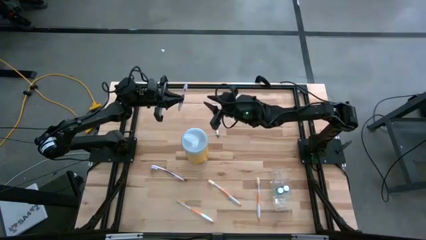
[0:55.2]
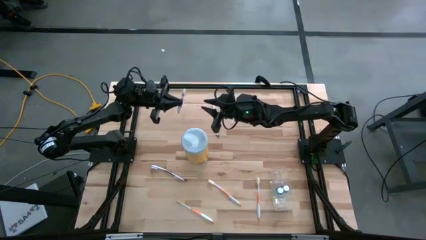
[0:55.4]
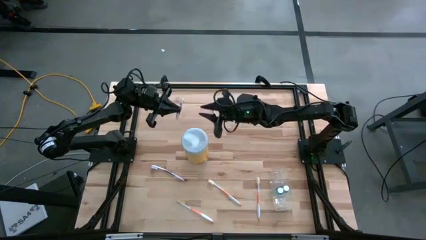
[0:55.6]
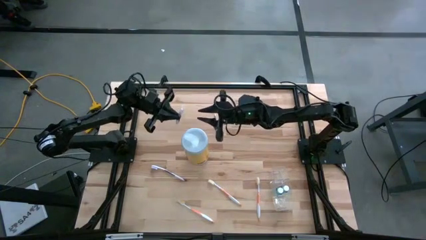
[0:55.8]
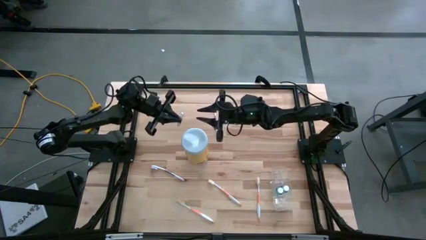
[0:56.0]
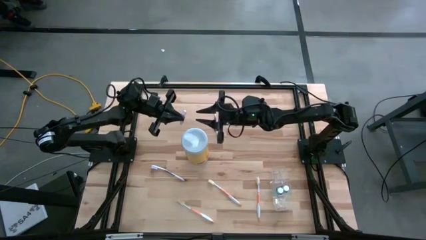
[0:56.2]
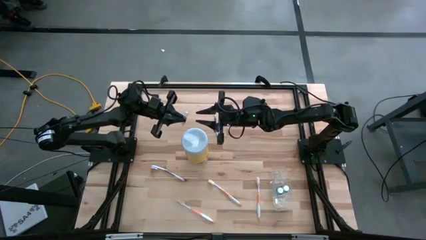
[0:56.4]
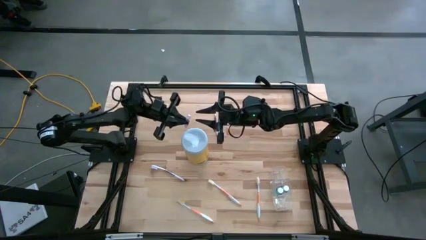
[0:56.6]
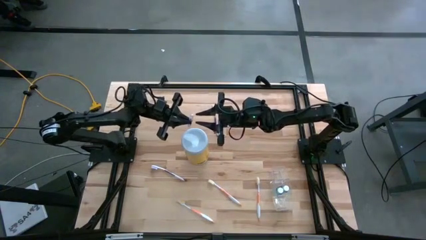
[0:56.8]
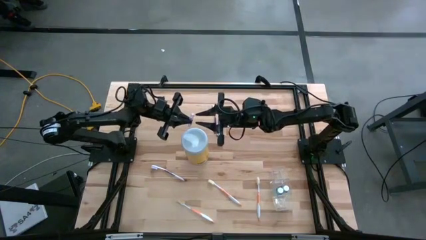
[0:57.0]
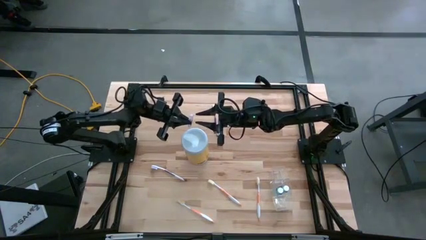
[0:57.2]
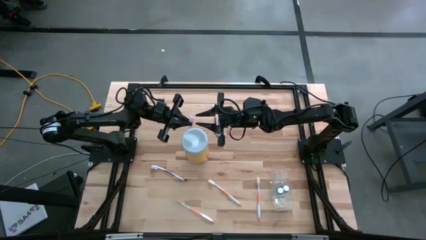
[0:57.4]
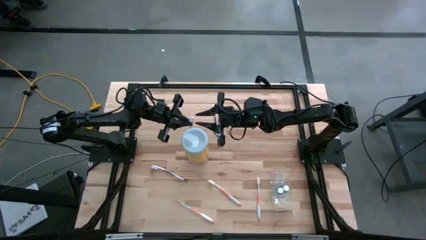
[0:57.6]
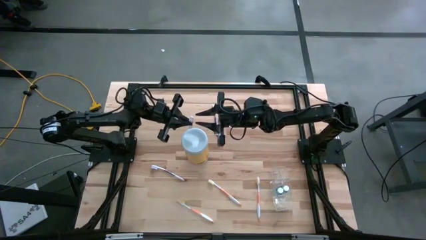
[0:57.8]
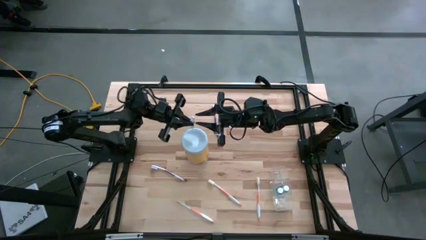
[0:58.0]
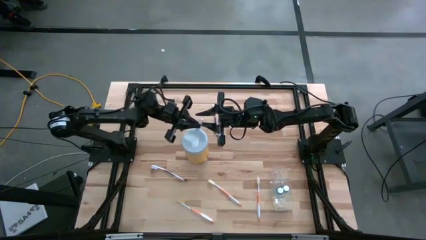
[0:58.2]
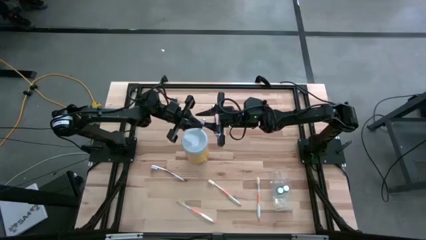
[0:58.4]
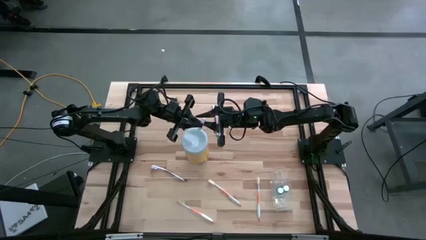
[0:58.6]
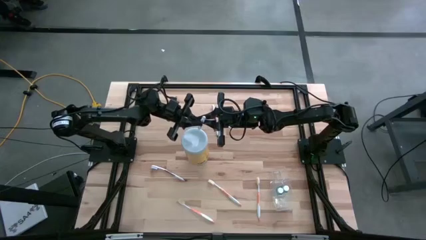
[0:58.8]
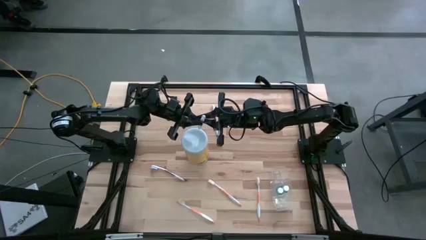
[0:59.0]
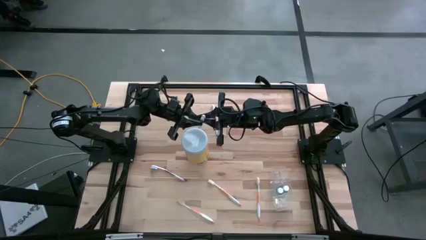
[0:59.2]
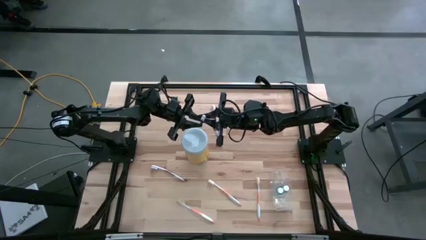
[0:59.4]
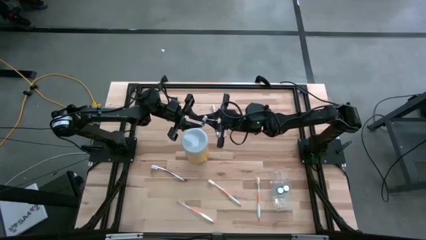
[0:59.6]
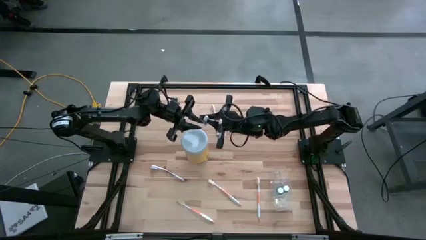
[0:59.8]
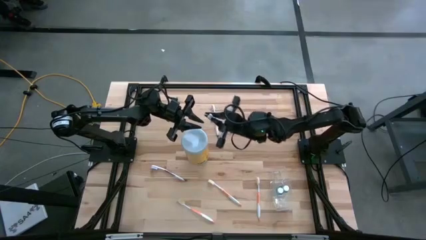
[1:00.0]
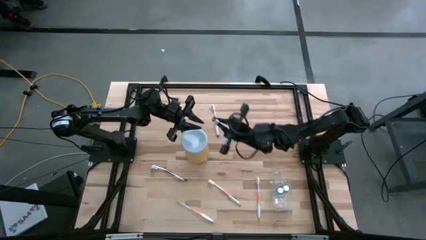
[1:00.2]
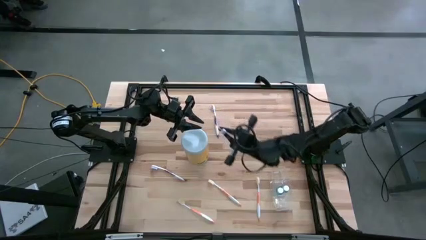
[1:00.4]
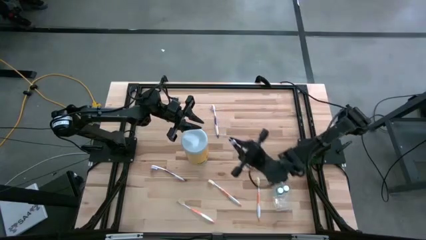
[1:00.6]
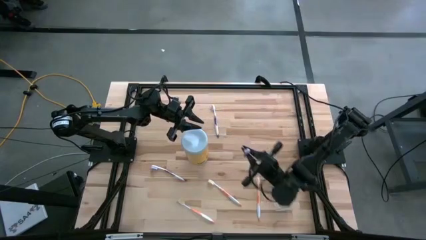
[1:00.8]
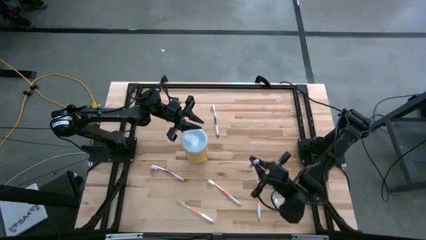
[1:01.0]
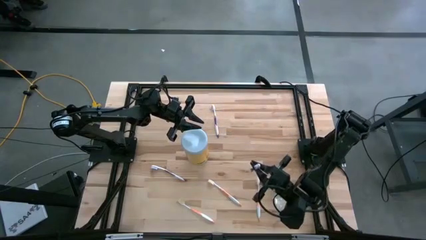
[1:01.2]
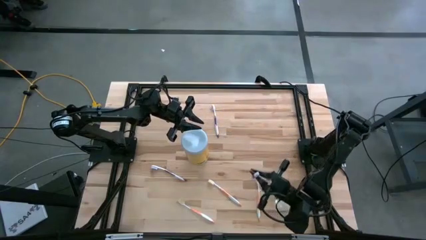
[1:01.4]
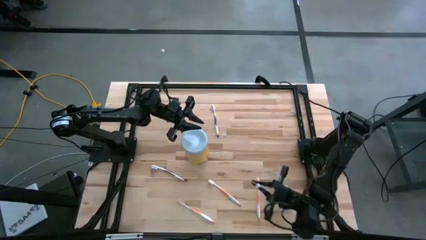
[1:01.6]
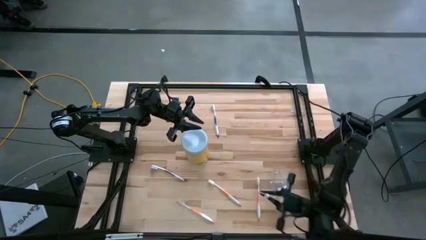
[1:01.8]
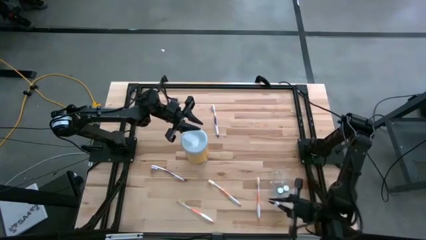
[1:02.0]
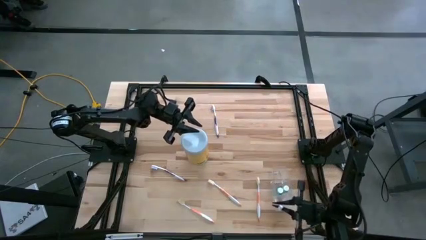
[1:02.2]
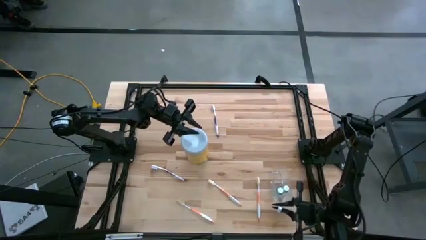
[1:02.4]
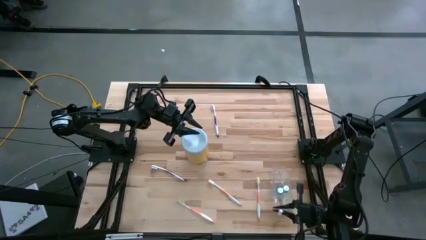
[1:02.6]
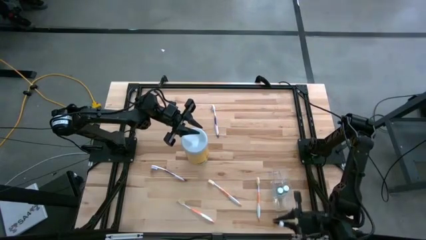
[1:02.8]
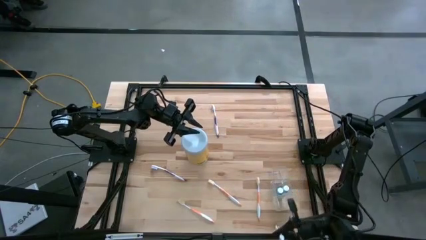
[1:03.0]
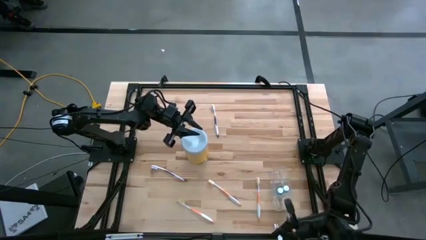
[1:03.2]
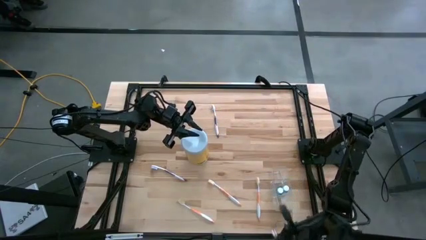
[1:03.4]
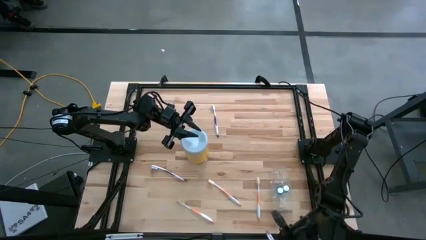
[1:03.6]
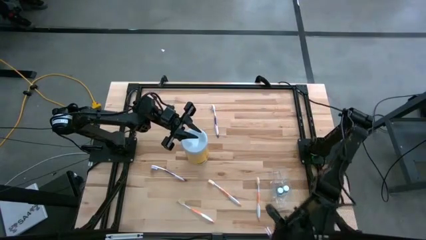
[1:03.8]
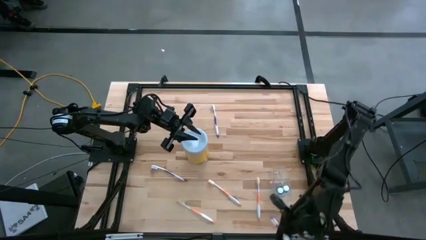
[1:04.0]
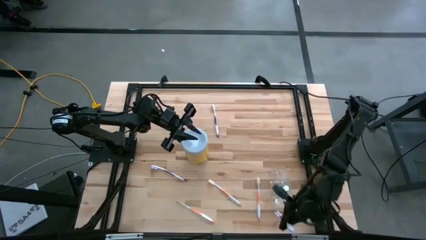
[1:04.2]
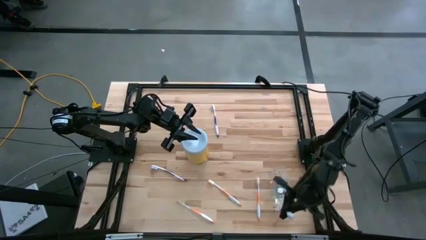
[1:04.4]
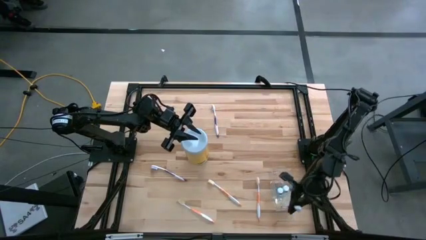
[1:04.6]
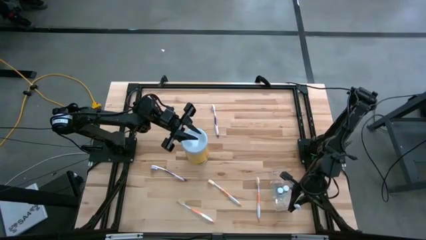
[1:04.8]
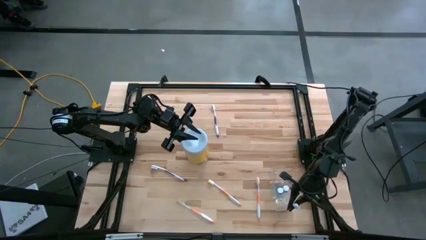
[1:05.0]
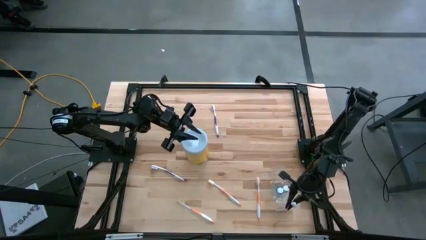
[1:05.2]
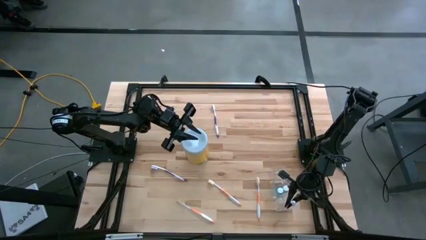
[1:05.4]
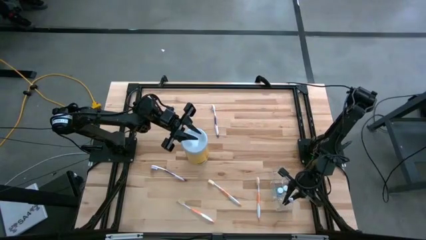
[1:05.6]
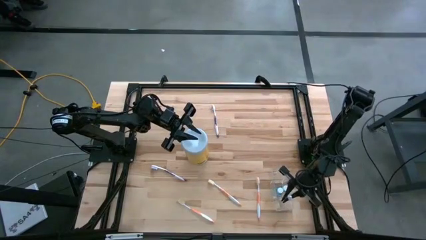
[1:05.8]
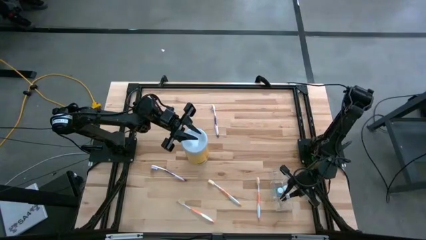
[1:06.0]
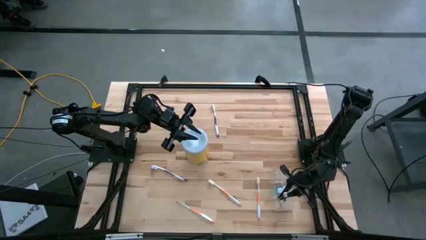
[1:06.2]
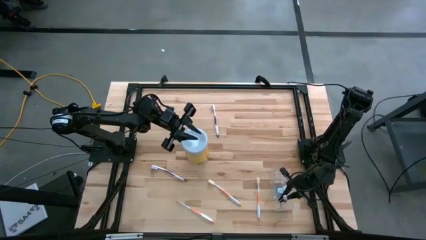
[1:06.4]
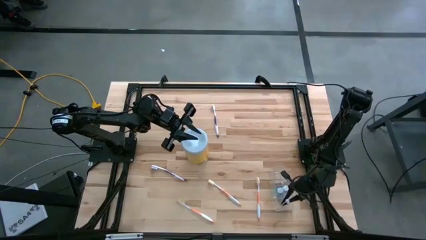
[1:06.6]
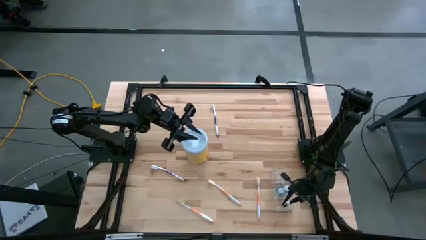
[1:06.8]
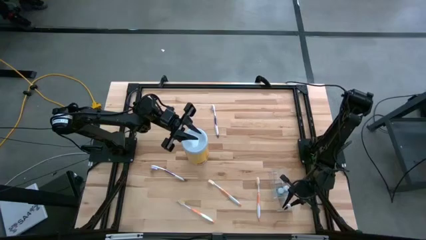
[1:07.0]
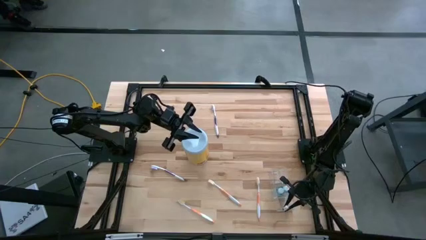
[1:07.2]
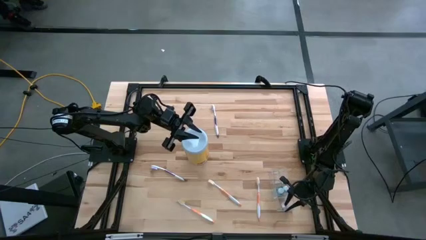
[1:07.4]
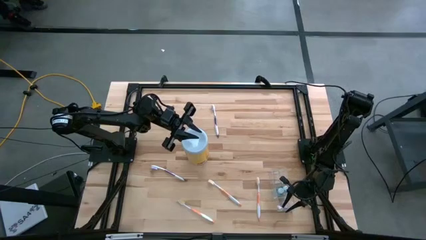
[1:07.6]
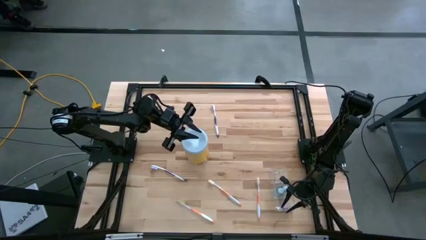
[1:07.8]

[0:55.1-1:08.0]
Task: Pick & Place toothbrushing station
Put the top left purple toothbrush in the bottom section of the transparent organizer

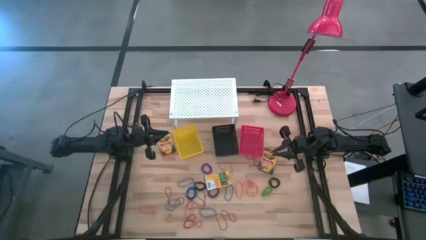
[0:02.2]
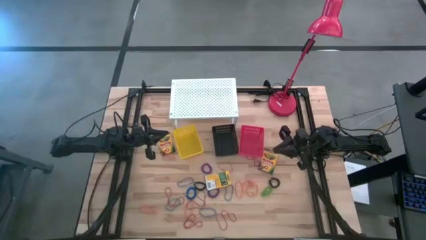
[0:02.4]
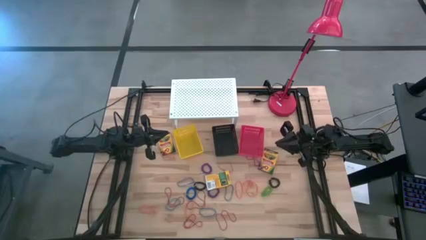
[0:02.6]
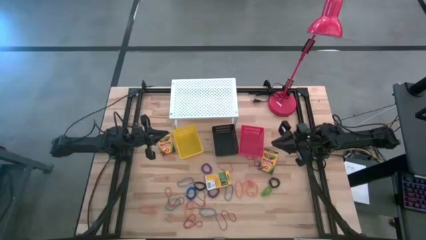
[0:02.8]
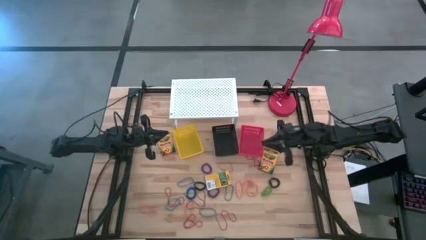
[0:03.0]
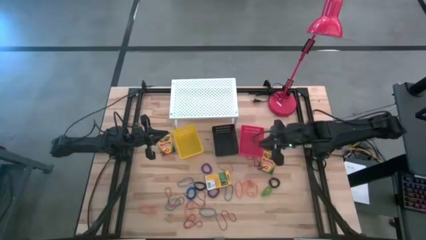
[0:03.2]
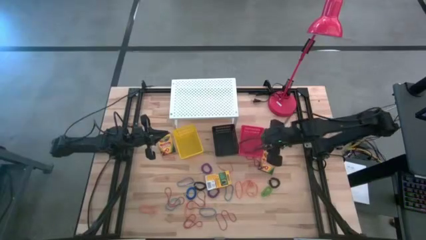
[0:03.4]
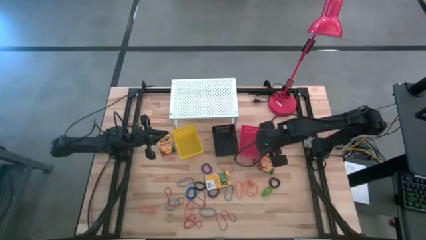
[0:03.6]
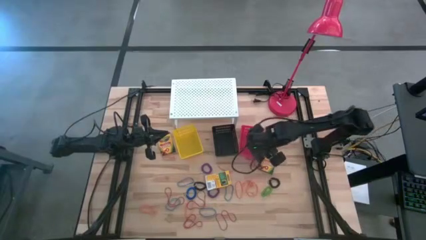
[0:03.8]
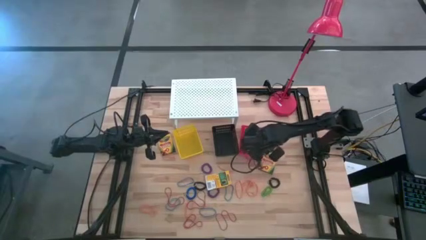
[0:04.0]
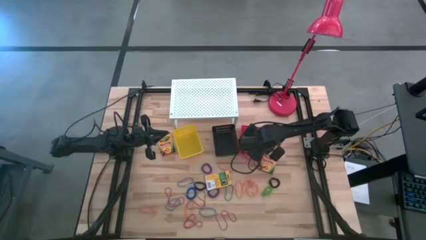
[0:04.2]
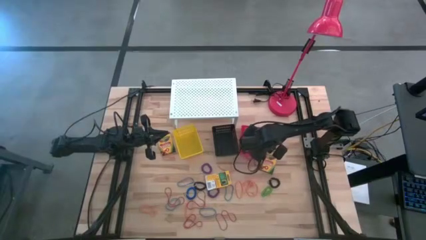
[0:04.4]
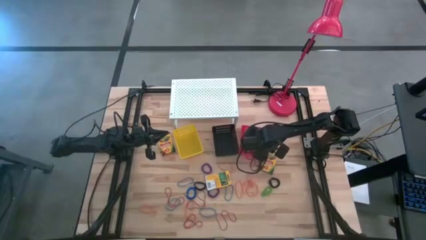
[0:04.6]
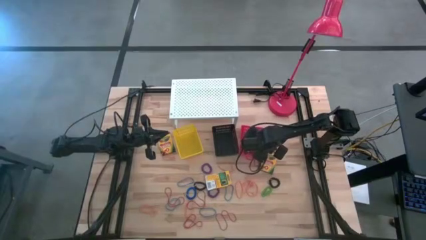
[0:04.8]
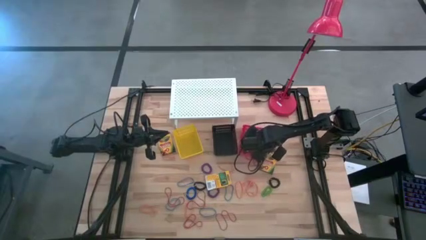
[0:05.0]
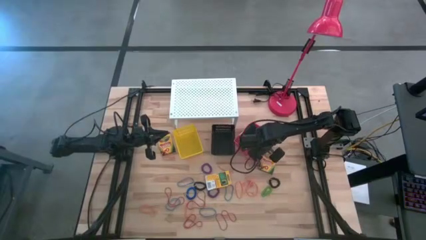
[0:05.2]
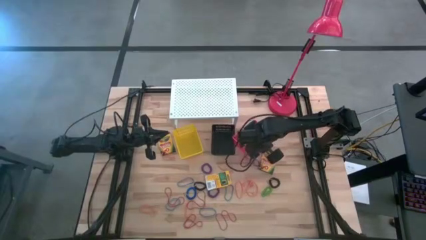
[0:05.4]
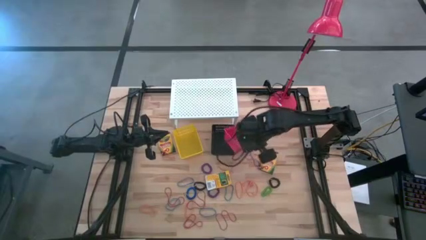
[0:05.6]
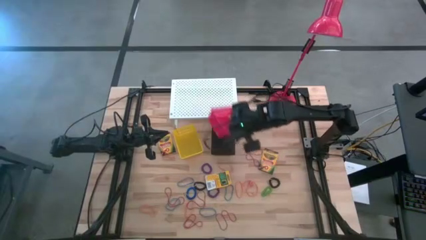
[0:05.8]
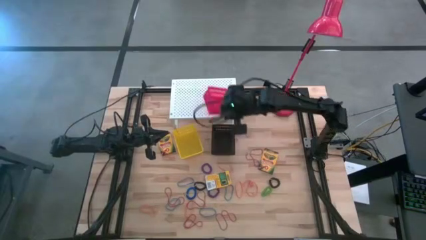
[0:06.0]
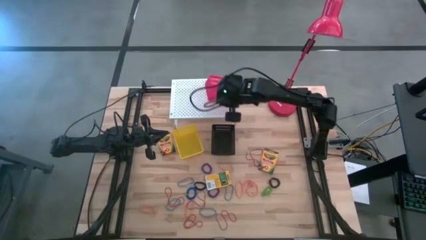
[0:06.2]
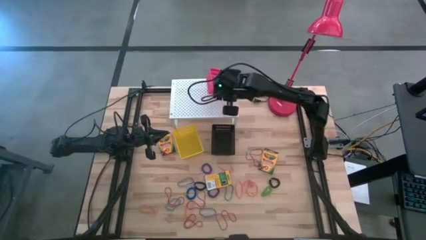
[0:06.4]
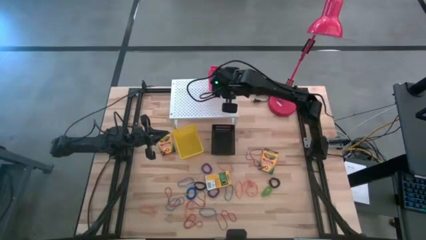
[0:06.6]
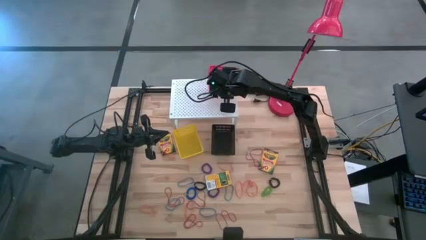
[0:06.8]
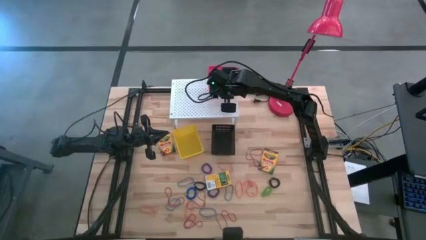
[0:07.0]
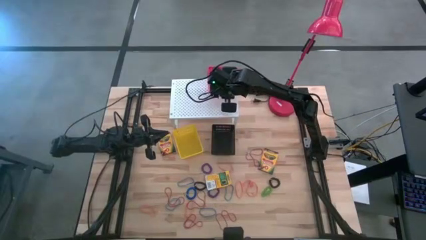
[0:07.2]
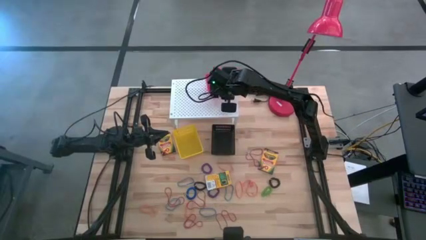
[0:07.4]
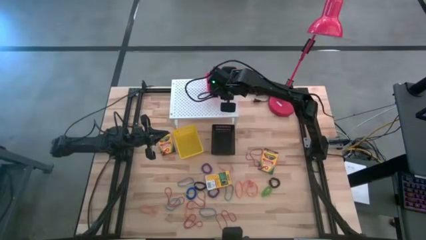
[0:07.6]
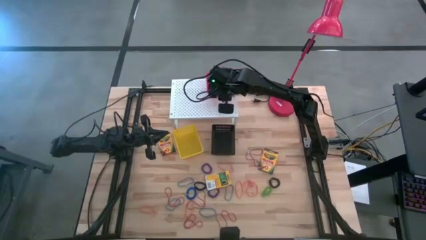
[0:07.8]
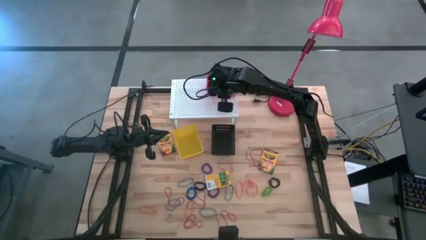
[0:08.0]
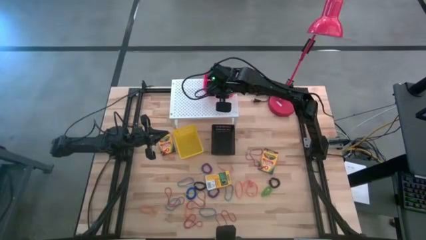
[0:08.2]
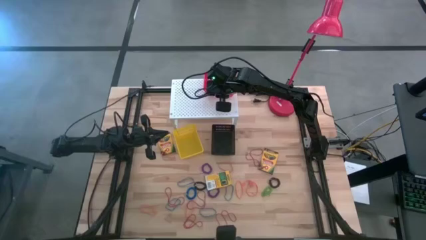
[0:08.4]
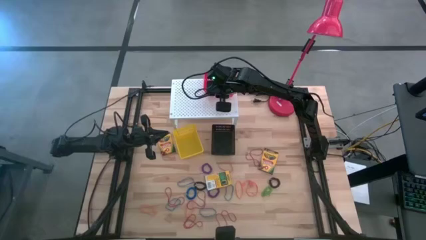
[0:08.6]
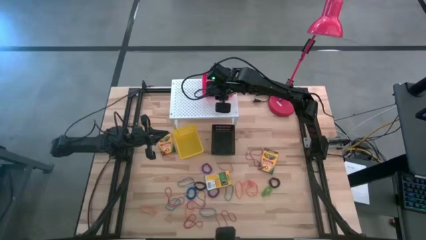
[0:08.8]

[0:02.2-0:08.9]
Task: Pick & Place Office Desk Supplies
Put the red bin on the shelf
